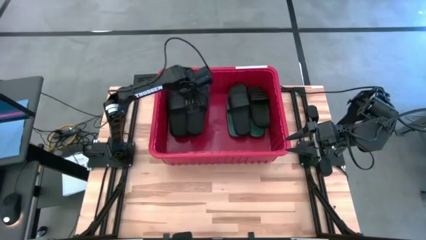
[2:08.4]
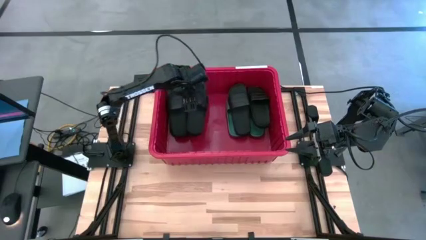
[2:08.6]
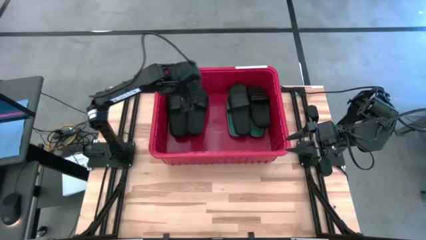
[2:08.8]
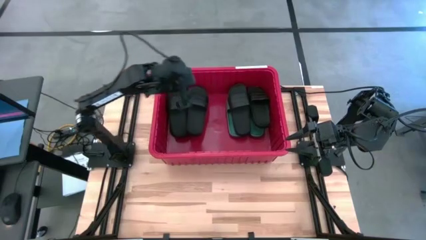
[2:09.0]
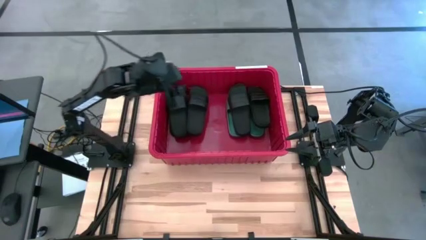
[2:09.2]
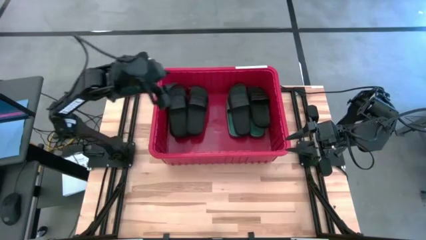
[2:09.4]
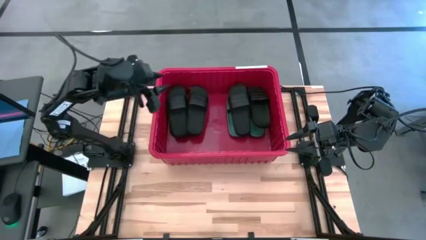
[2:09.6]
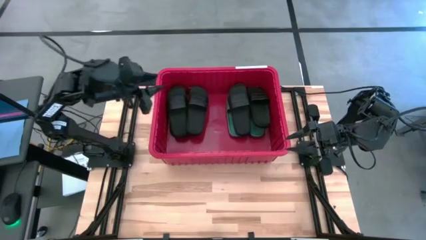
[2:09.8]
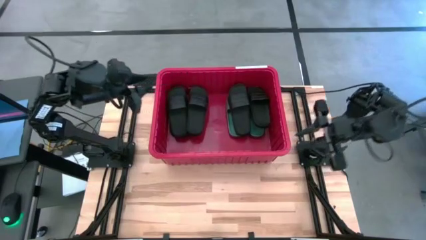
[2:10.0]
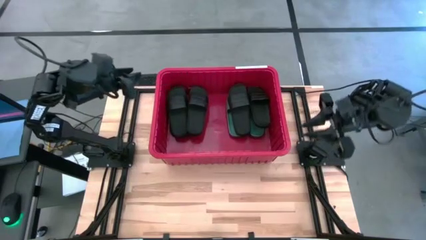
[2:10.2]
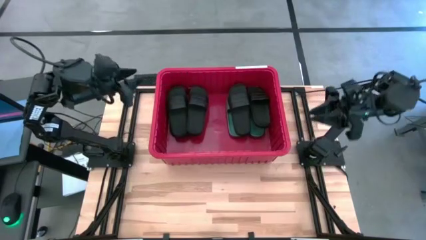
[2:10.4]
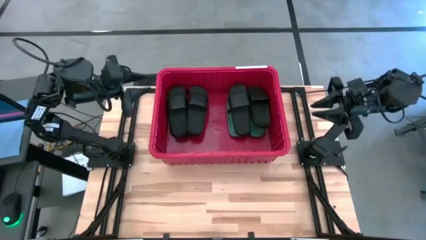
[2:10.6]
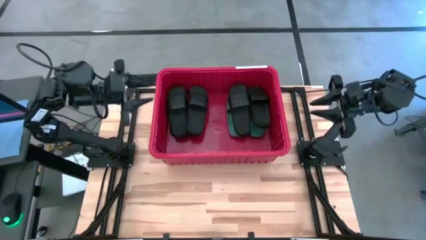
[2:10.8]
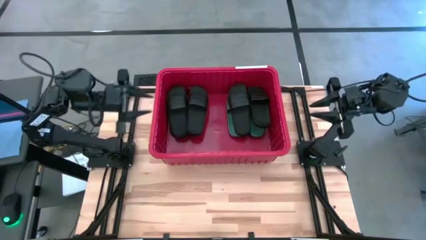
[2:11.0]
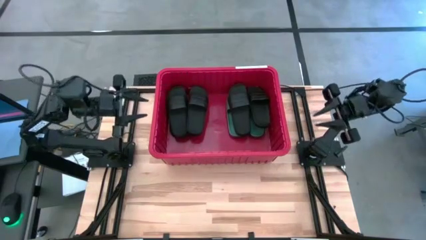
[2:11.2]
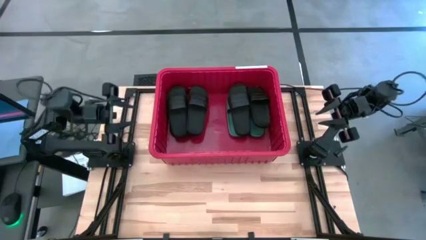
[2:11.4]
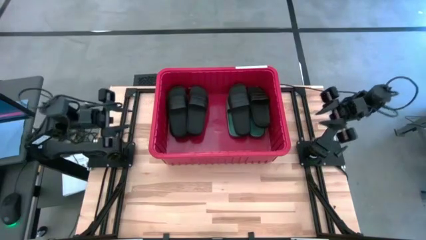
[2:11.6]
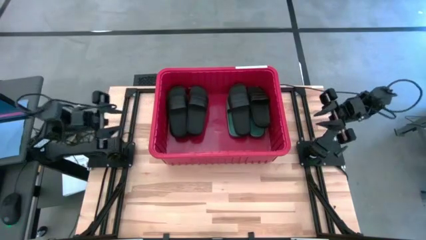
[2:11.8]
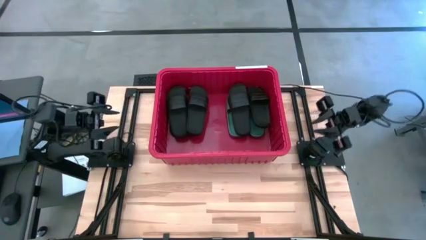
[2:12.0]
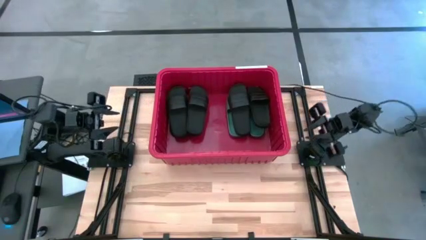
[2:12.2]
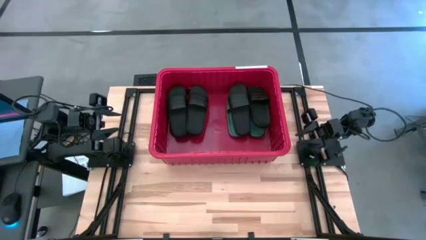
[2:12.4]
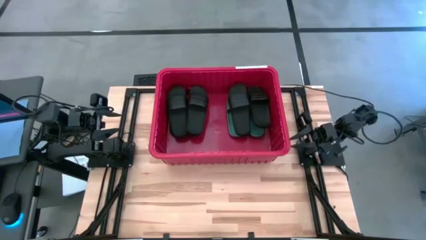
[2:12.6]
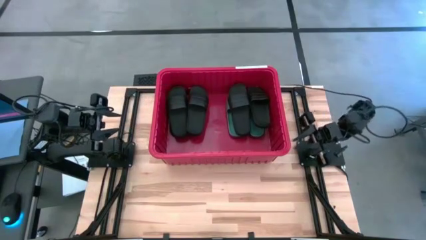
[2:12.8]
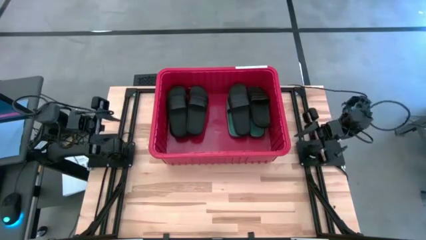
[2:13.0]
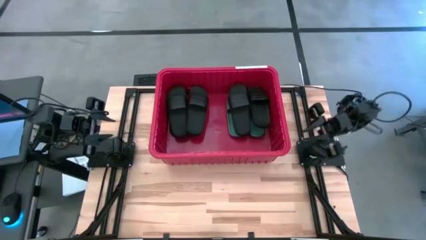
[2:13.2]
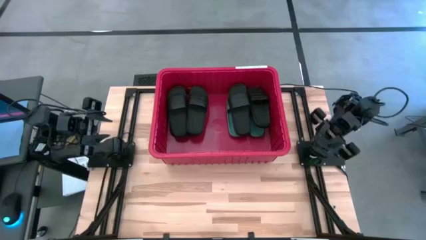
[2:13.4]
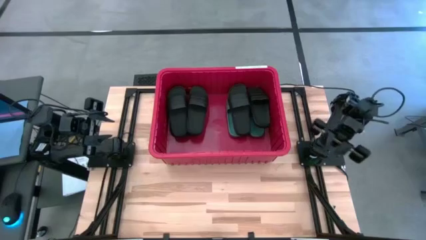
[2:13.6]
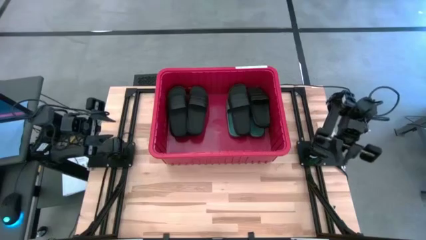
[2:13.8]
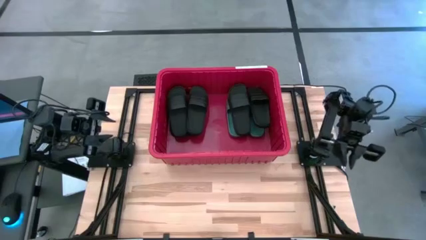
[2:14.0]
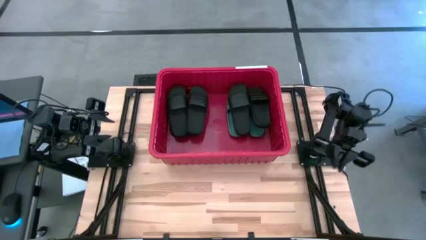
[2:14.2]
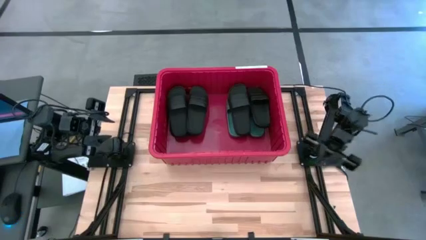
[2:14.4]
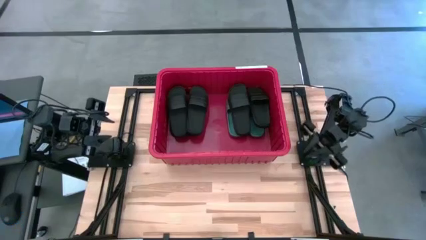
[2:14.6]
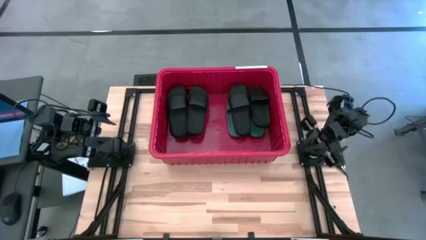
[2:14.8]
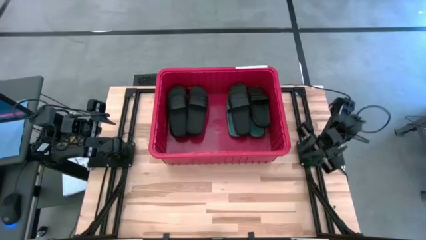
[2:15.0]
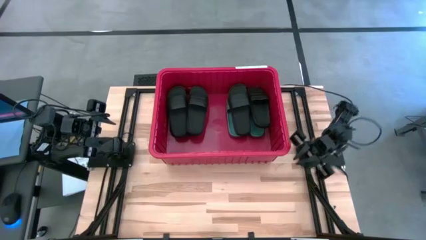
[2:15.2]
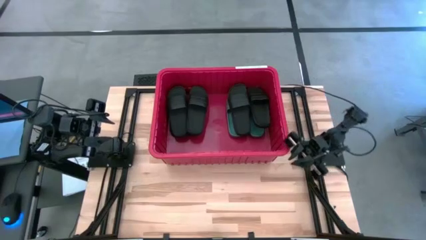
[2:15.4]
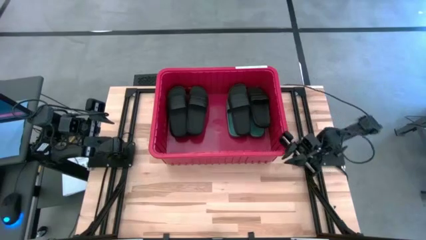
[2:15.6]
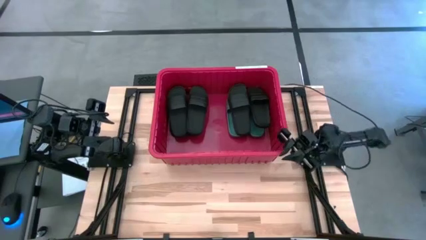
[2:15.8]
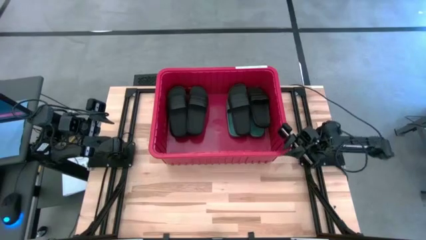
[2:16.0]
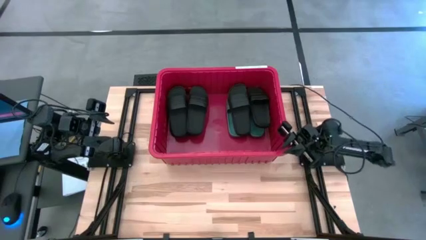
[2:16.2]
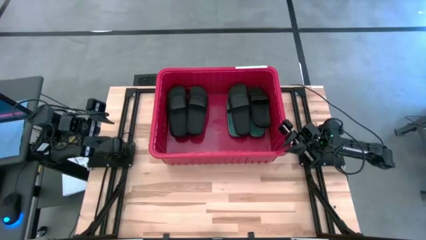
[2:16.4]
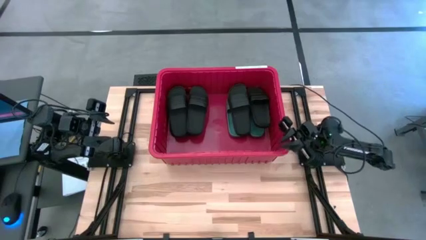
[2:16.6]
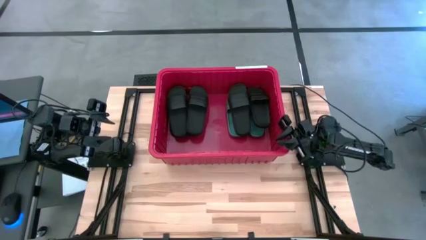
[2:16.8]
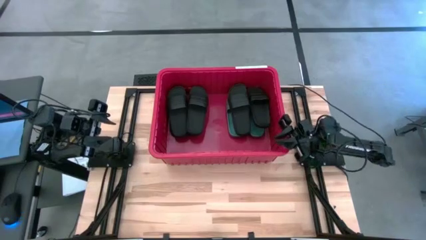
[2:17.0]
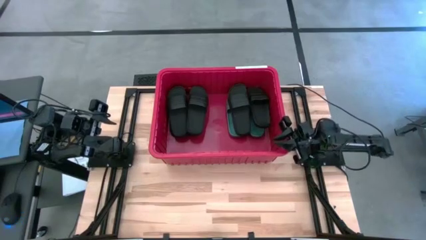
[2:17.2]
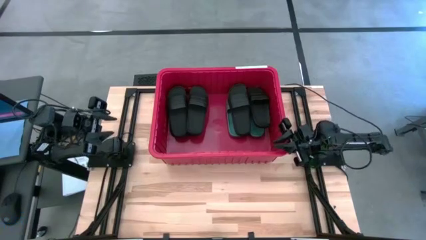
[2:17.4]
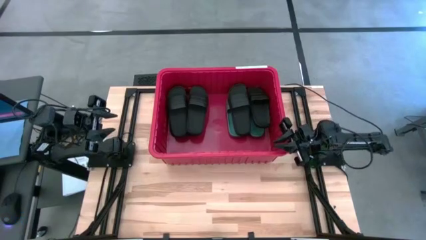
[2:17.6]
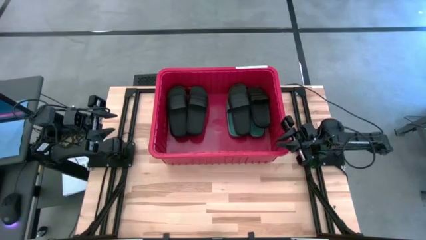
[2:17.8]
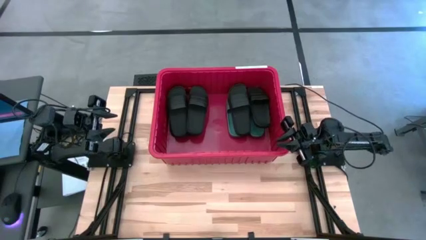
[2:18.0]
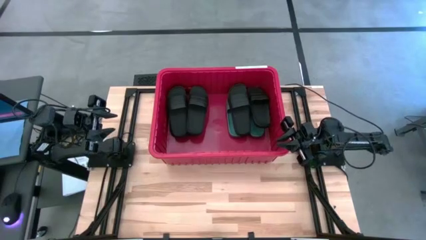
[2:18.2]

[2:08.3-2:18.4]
Task: Pick and place slides into bin
Return to Home Position

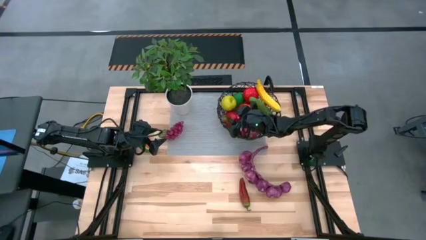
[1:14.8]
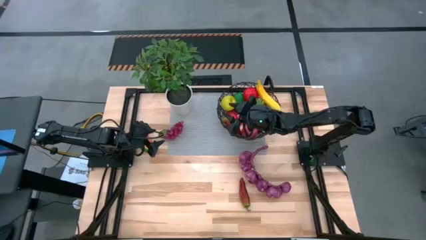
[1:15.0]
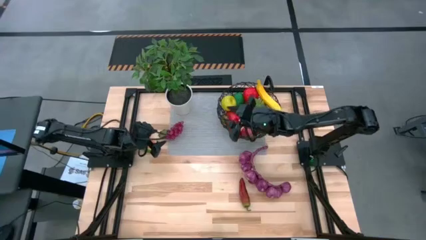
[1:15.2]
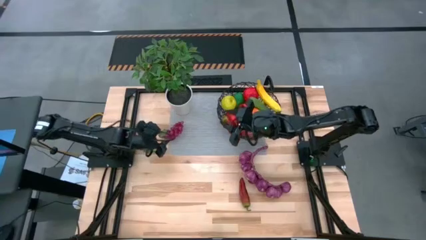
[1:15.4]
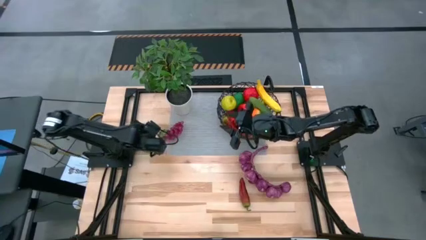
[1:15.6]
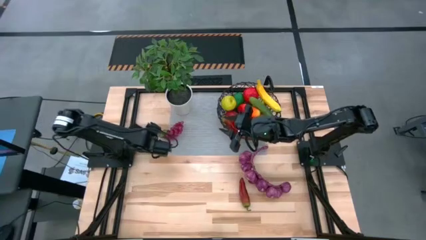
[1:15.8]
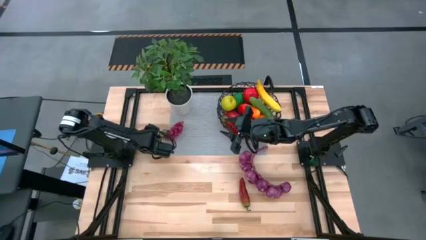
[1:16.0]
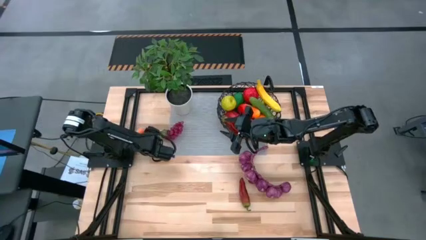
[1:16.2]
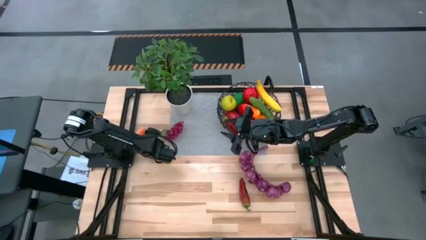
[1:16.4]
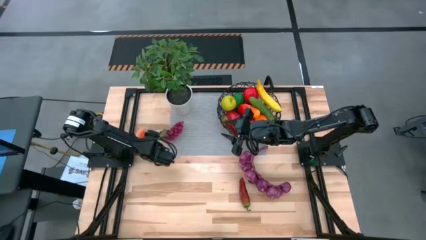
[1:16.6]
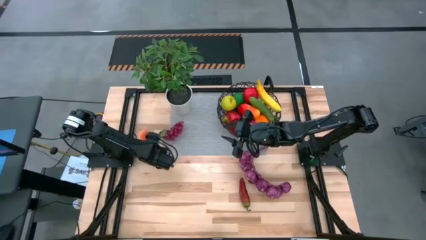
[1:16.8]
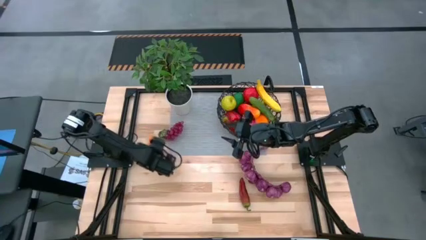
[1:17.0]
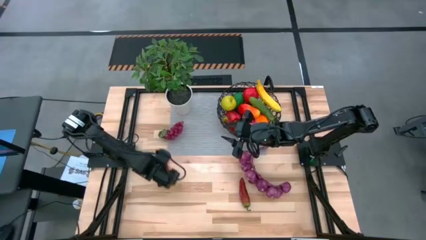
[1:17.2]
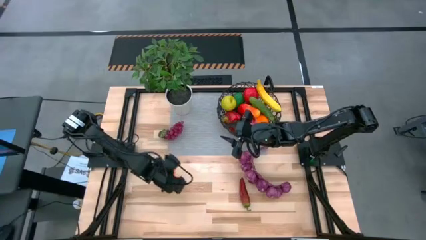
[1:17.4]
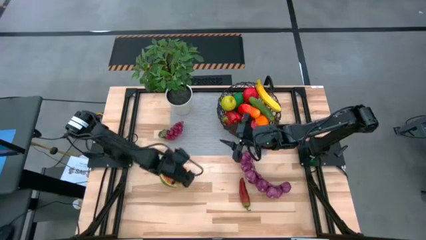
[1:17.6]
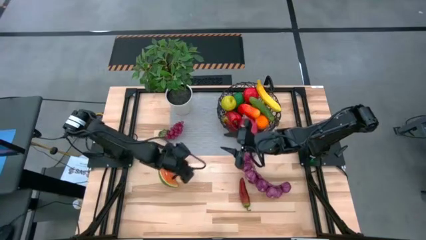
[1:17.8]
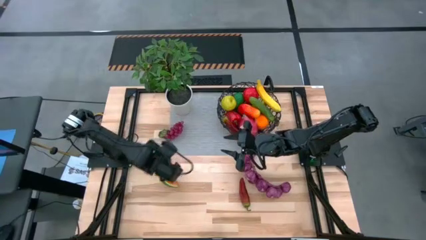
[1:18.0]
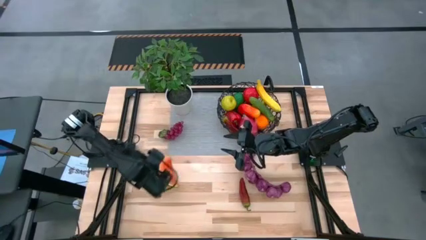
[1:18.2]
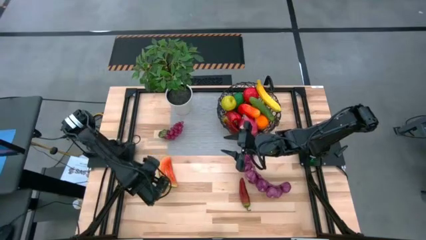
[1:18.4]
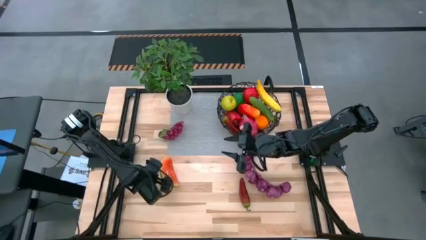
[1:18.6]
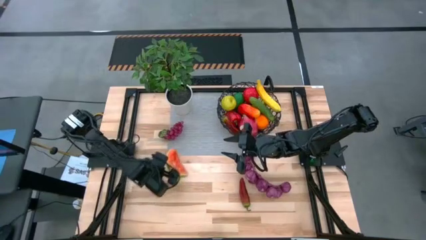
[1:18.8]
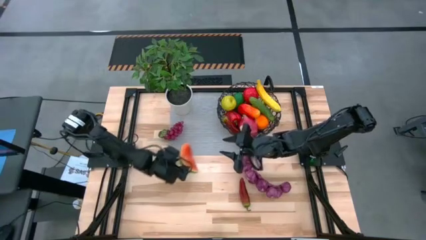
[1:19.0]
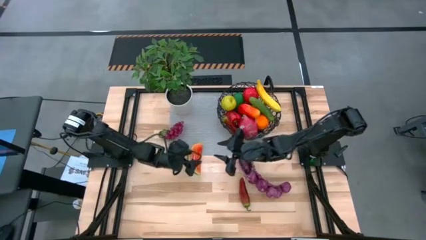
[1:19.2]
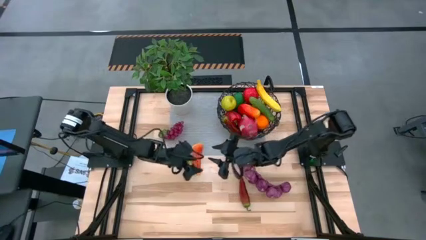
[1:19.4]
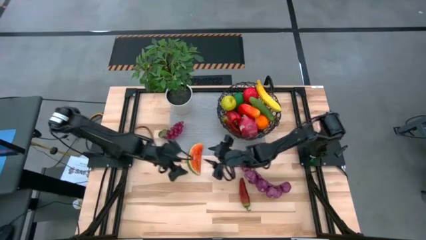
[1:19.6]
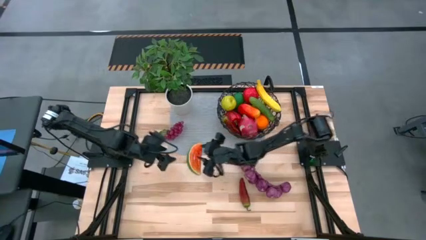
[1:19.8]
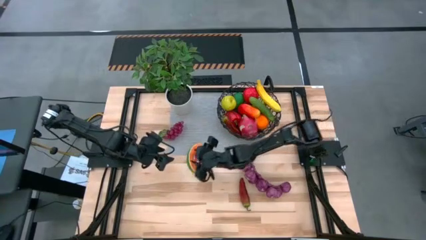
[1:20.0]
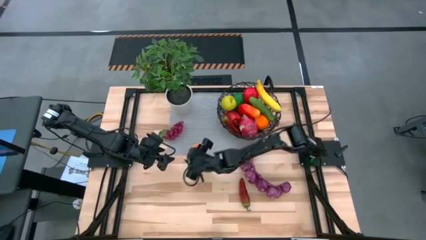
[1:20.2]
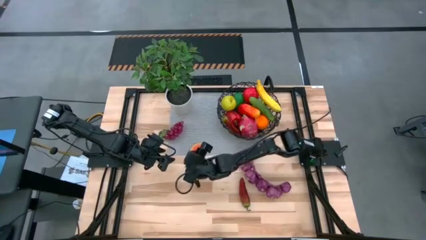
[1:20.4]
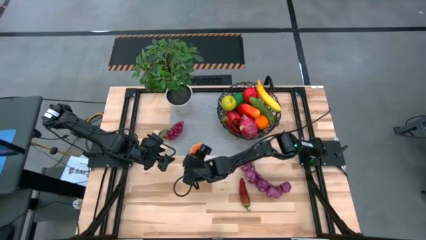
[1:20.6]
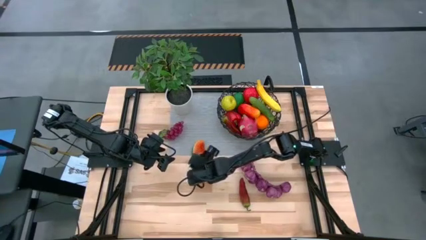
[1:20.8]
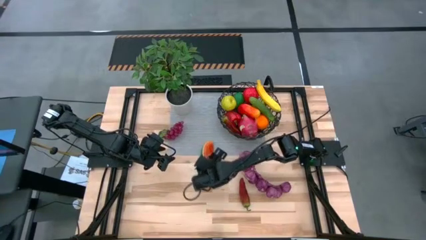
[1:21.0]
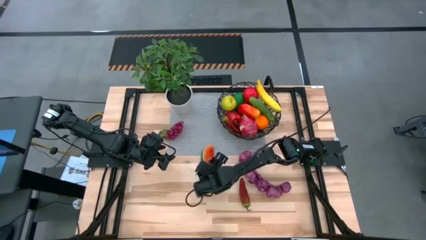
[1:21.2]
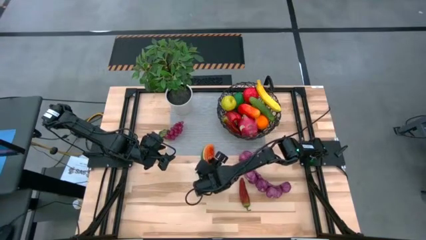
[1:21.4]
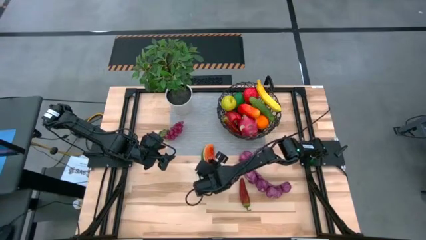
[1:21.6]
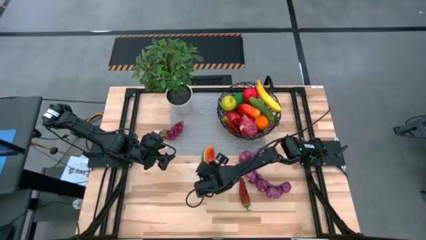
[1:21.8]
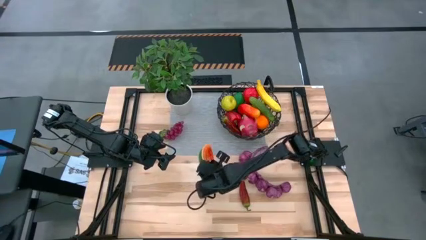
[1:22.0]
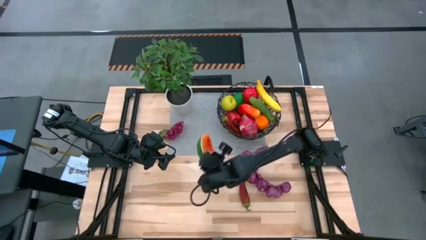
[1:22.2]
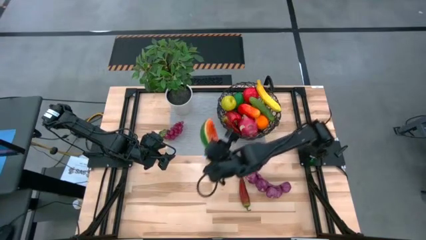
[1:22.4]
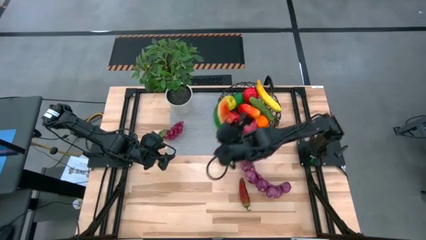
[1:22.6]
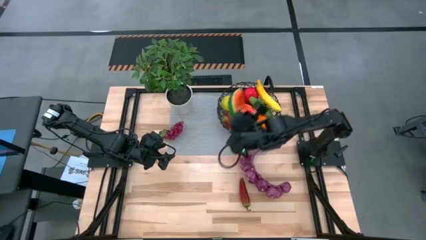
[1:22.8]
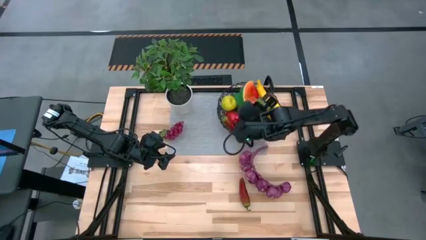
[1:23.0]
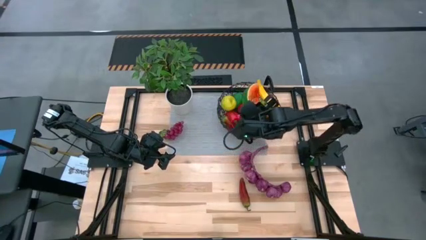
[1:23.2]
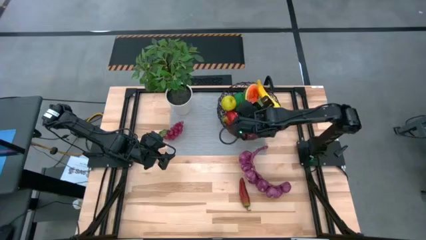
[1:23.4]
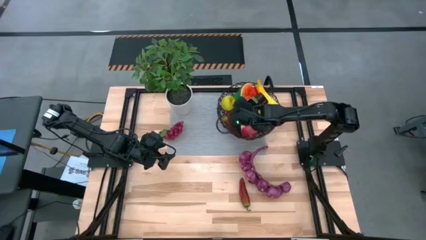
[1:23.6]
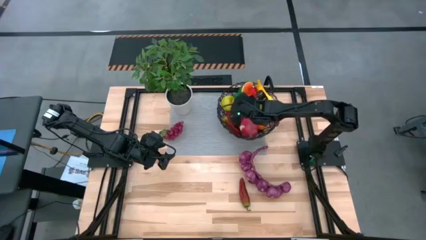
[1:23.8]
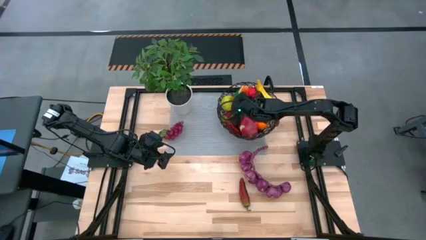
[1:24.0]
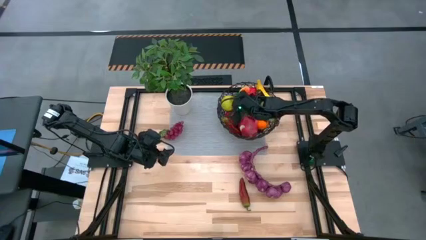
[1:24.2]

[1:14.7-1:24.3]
Task: Build produce basket
Put the watermelon into the wire basket
